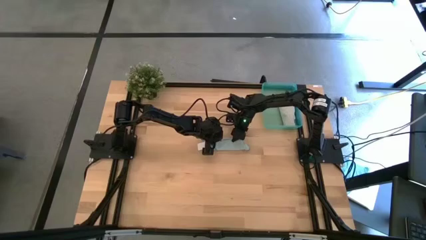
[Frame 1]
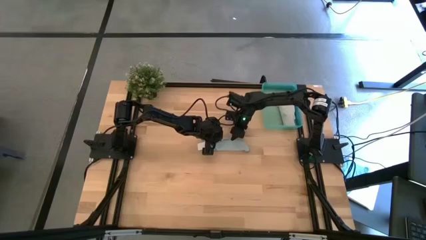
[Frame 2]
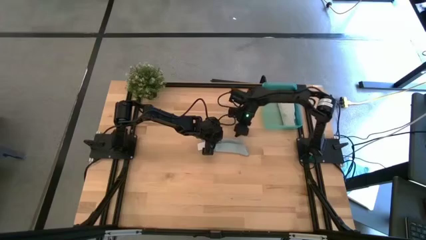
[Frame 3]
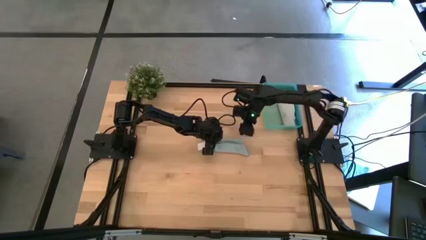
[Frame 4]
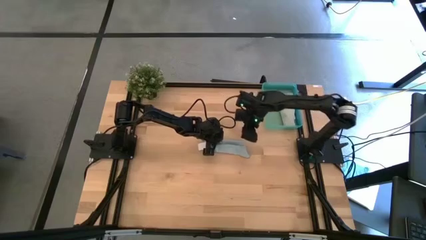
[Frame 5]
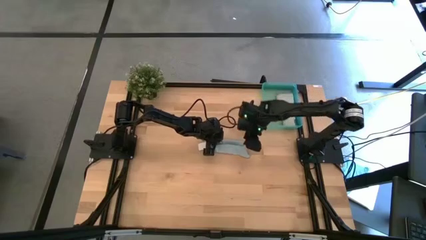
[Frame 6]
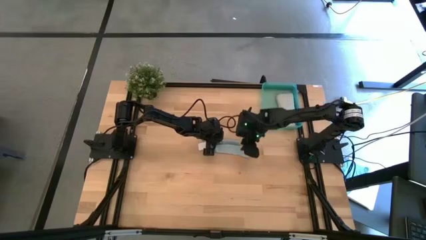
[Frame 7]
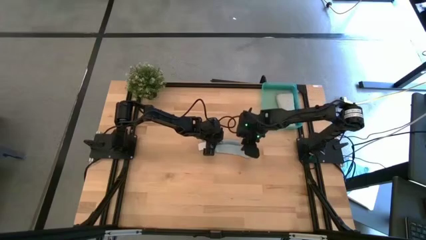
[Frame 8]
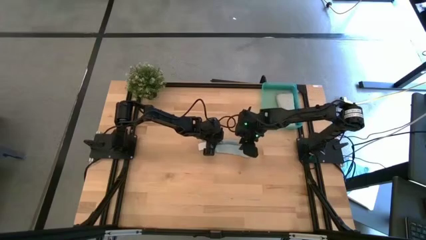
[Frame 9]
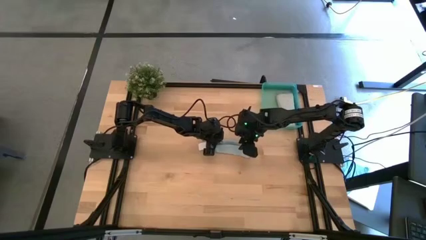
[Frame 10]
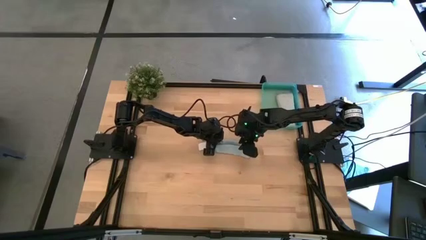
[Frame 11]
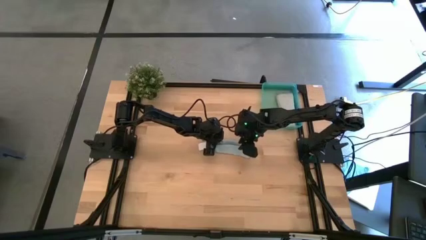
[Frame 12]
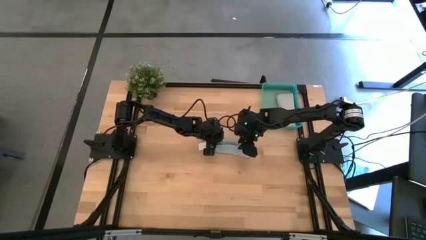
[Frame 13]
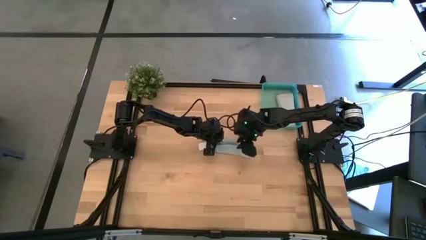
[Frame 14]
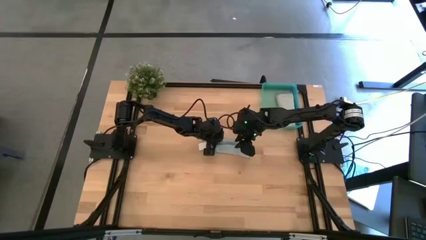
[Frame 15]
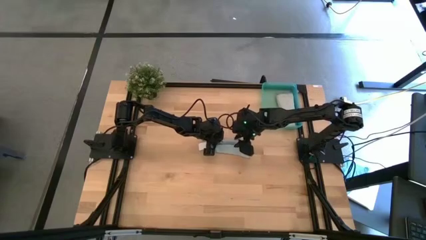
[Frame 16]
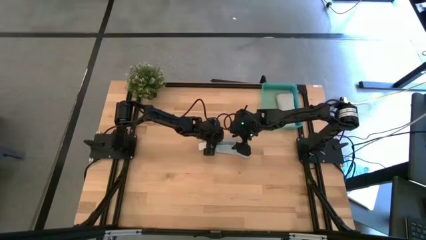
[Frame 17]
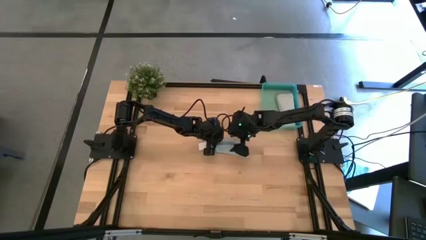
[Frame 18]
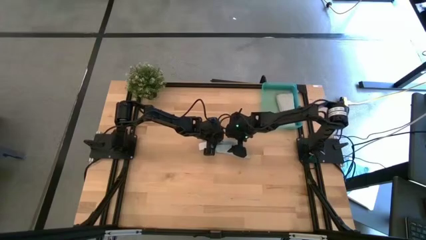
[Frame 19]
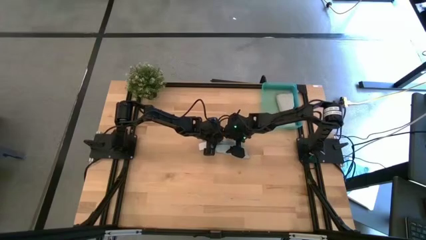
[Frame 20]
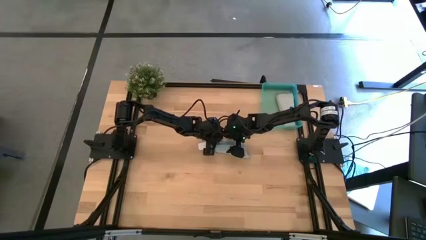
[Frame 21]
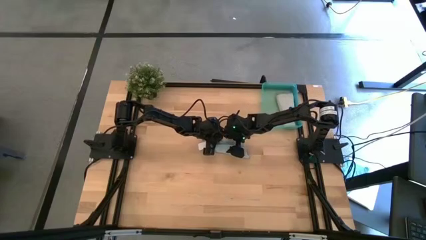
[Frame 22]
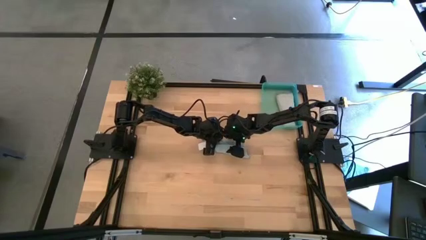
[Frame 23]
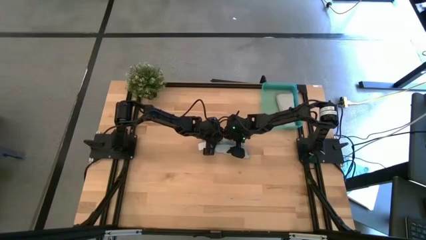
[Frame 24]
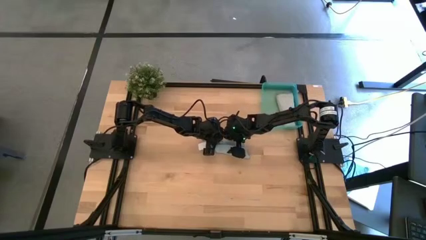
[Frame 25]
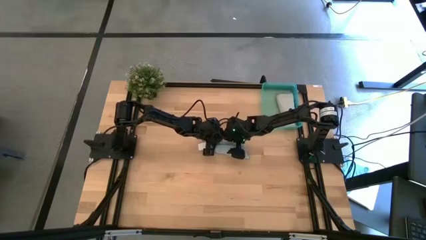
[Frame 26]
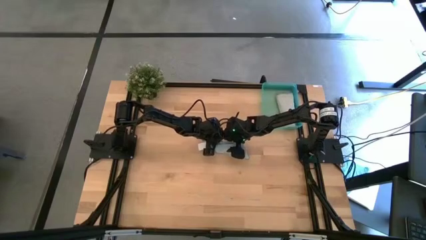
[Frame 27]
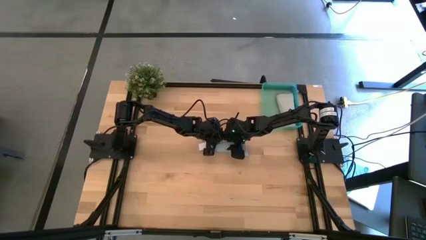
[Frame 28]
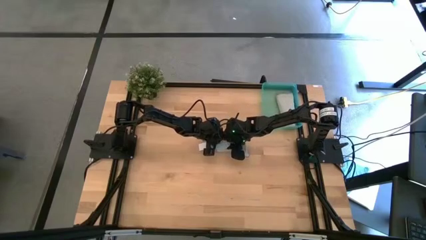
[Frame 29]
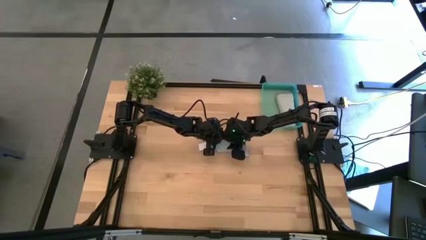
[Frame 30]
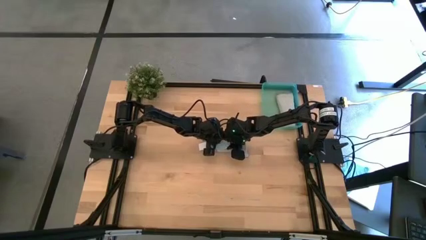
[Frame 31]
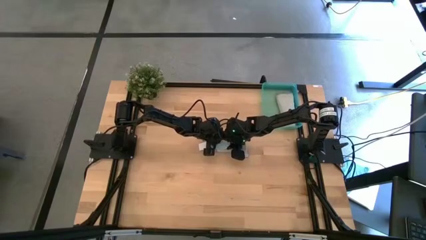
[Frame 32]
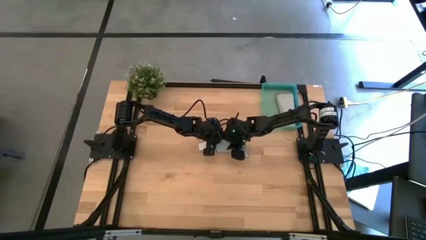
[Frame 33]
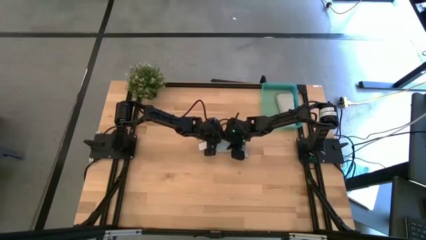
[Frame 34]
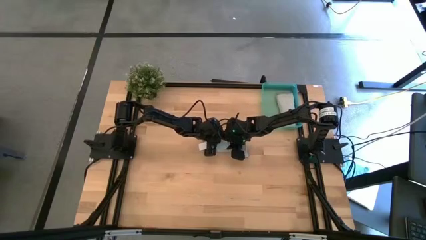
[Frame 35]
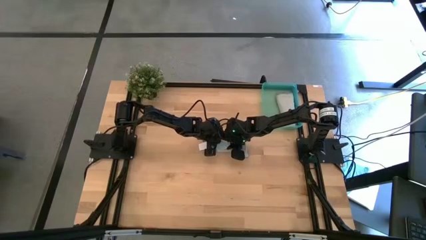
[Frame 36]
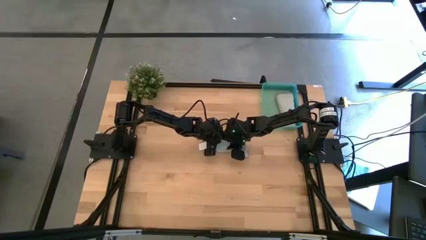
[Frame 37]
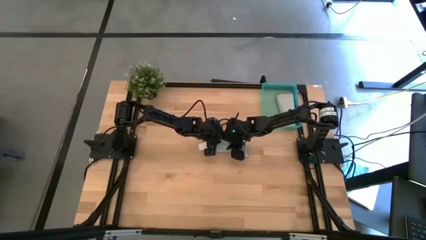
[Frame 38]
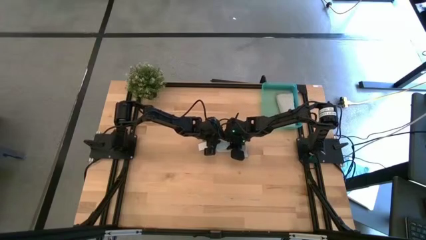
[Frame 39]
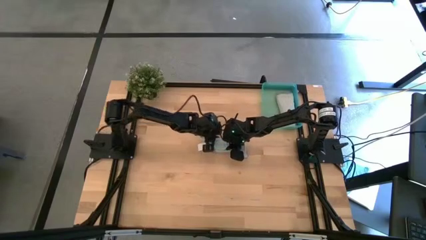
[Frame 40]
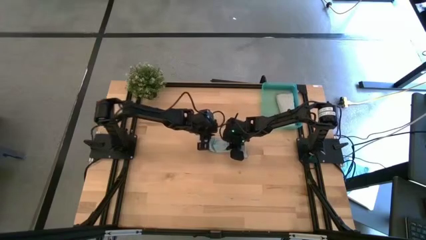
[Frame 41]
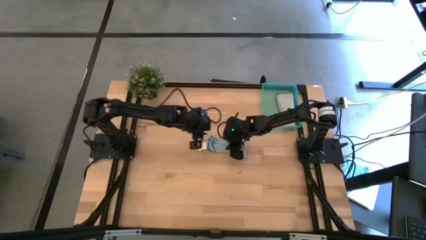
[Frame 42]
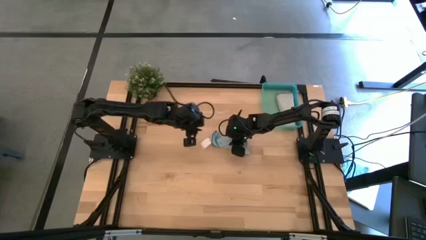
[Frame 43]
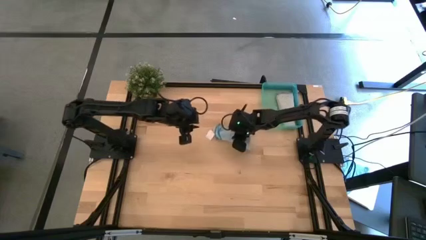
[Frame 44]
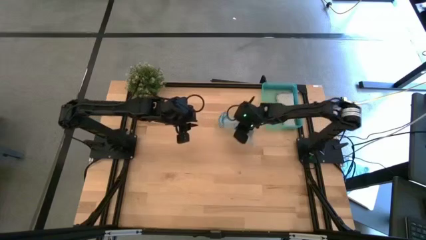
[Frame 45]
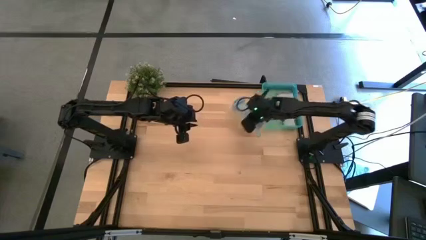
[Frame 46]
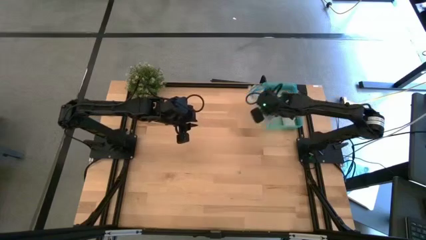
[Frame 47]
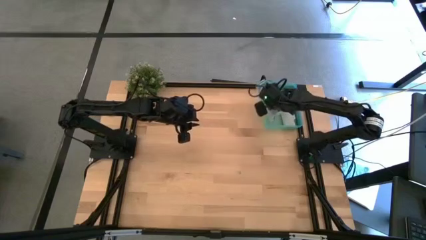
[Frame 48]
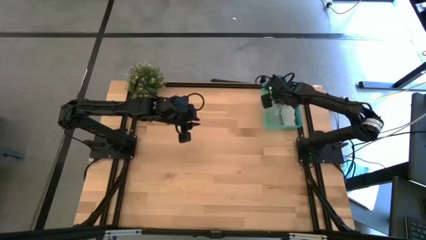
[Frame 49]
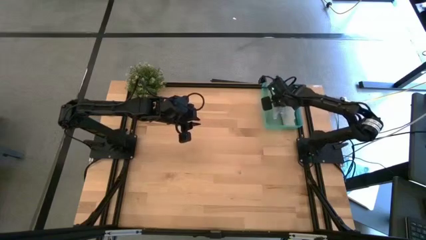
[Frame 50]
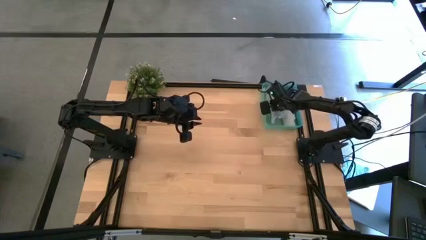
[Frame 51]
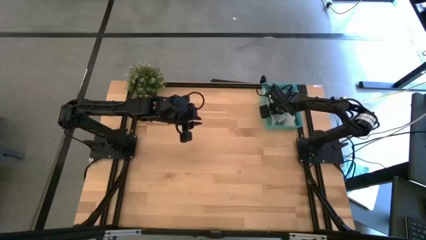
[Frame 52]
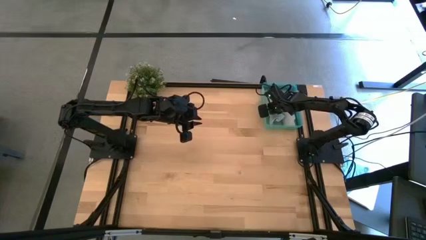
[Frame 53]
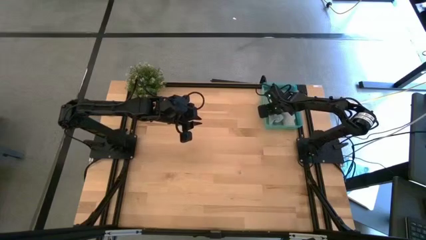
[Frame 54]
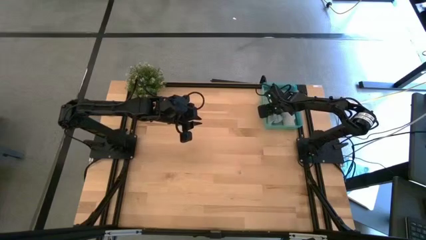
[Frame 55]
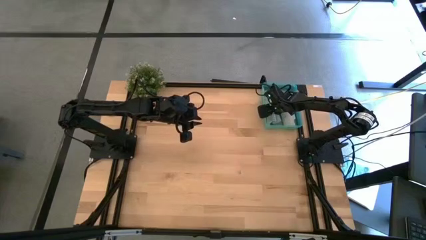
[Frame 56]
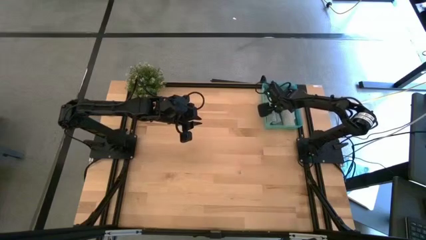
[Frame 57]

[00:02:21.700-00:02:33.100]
Task: Roll microfiber towels into tight, uniform cylinder then place into a basket
Put the blue towel into the green bin

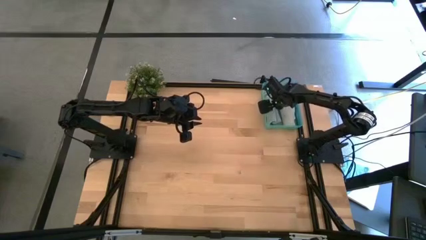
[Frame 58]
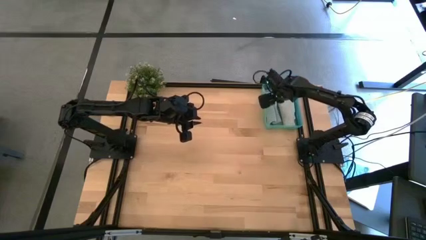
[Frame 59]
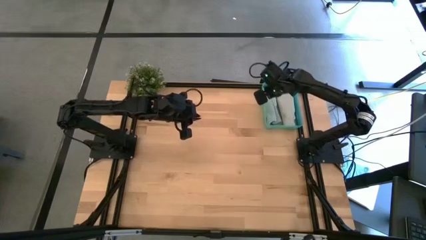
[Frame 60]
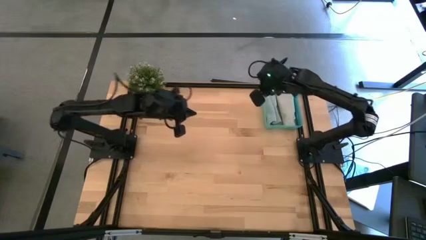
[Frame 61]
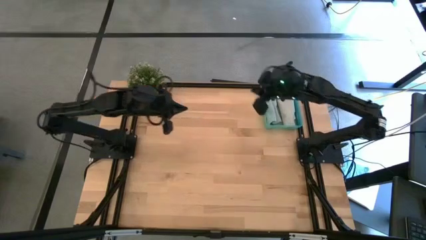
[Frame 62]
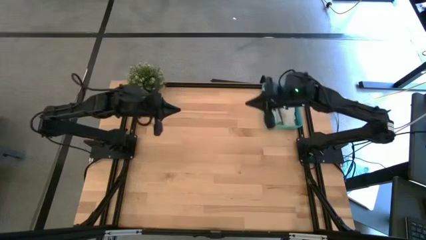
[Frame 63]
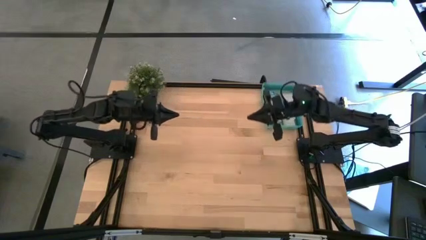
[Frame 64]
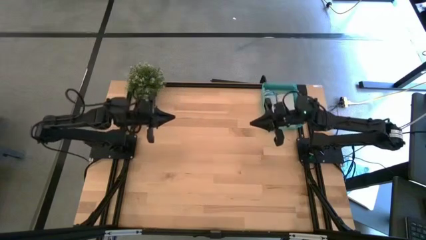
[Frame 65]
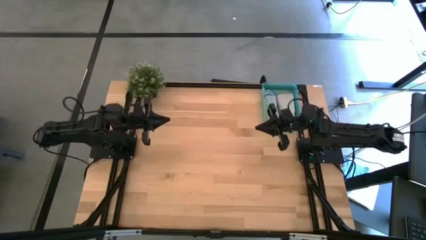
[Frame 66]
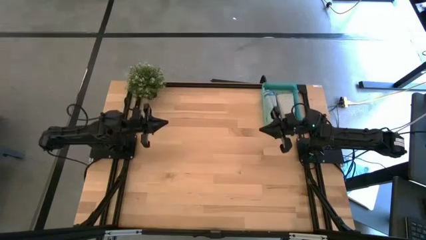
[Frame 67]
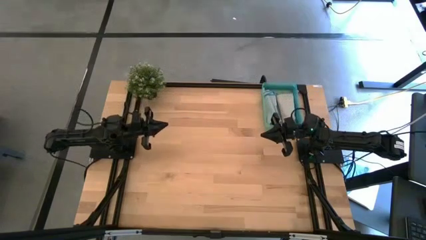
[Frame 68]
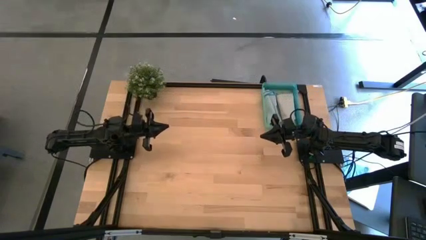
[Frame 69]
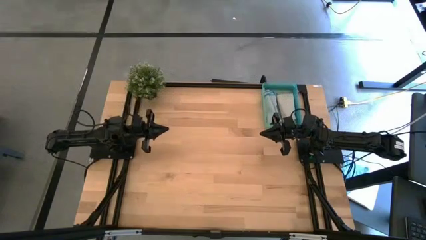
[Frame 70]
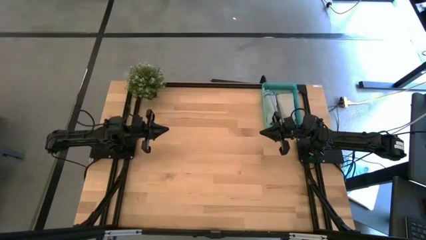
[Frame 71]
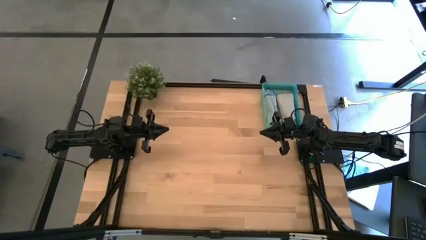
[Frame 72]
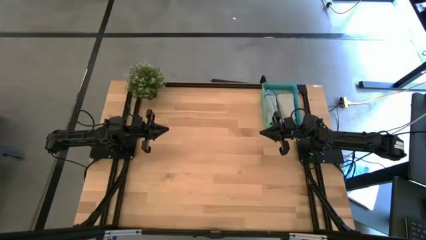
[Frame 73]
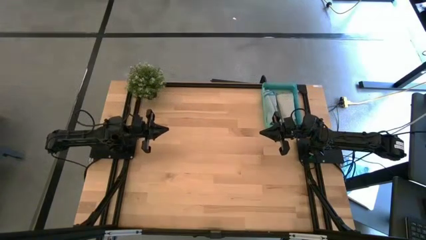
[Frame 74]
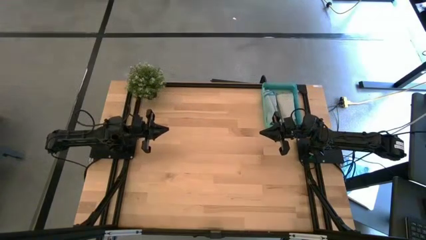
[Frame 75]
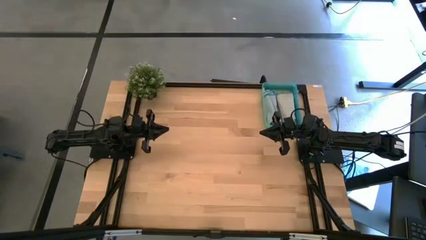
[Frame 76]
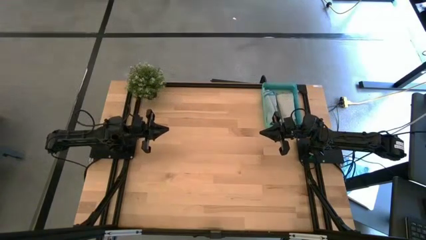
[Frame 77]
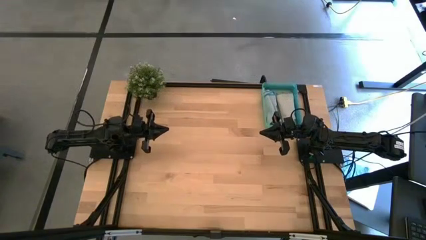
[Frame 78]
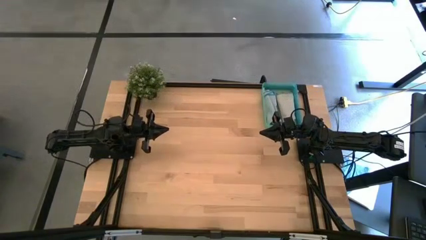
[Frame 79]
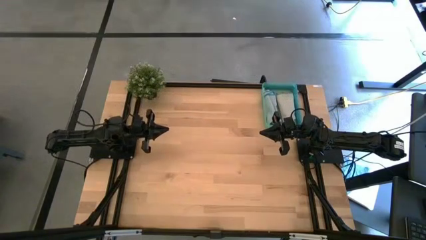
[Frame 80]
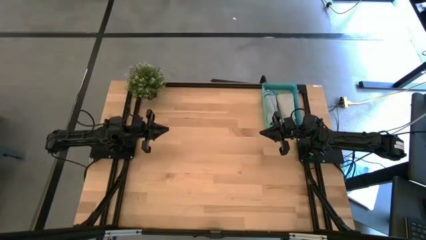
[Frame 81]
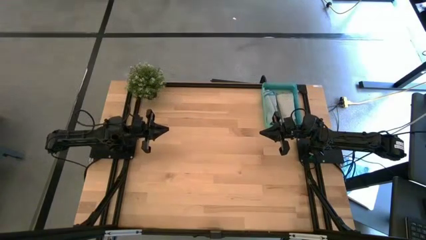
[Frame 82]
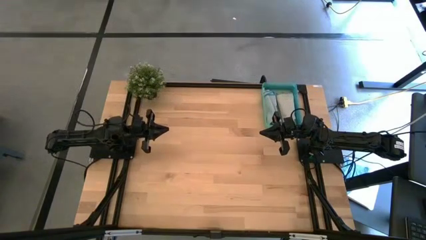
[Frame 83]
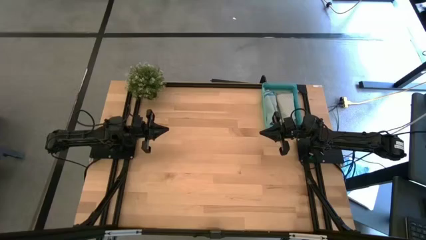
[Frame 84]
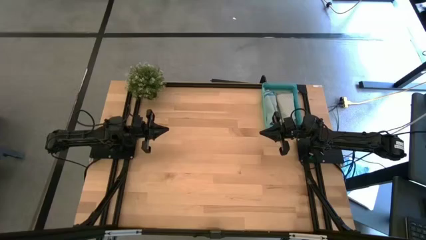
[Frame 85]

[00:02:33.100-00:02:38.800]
Return to Home Position
